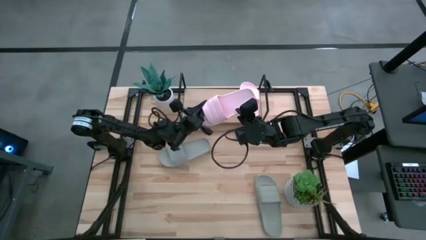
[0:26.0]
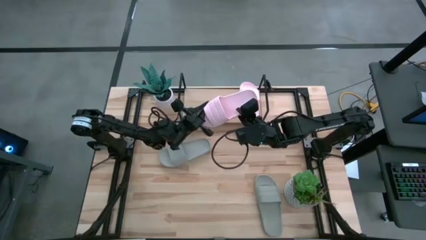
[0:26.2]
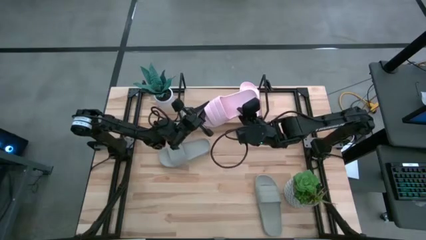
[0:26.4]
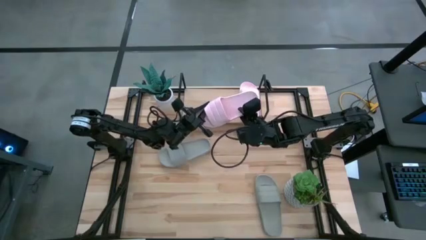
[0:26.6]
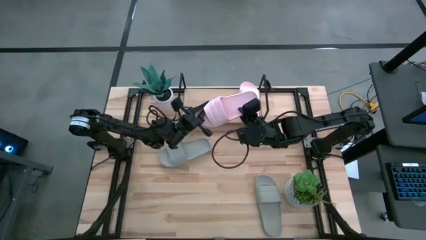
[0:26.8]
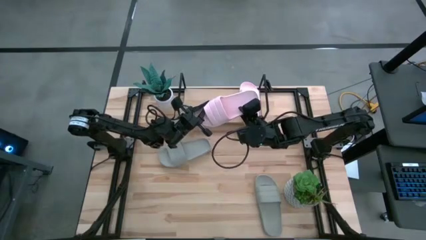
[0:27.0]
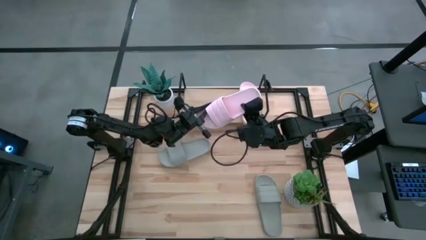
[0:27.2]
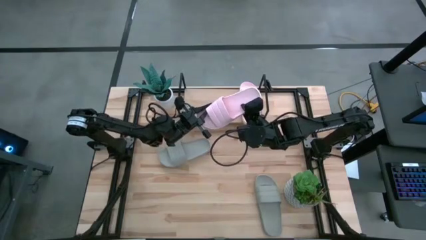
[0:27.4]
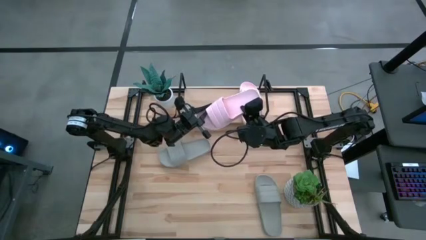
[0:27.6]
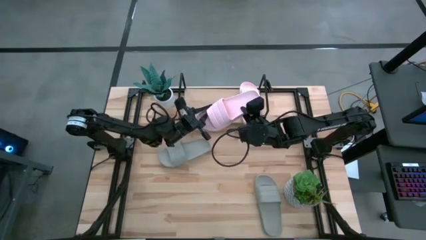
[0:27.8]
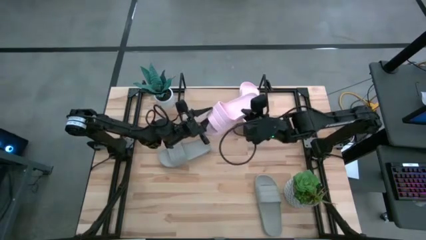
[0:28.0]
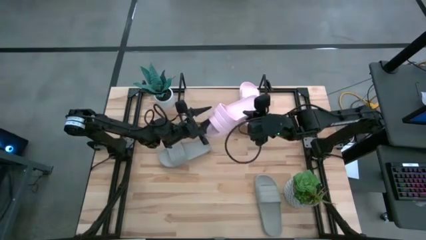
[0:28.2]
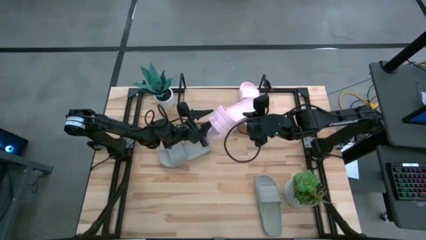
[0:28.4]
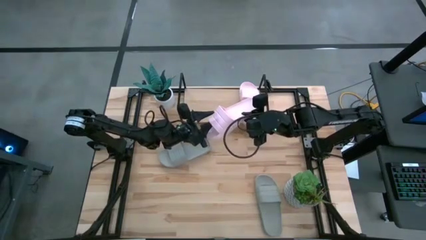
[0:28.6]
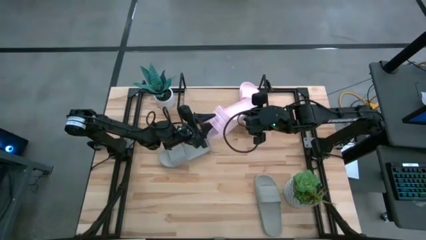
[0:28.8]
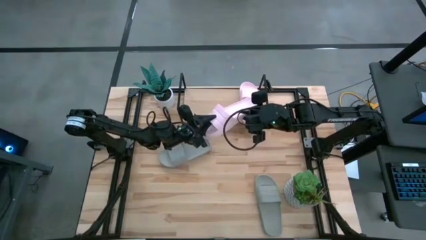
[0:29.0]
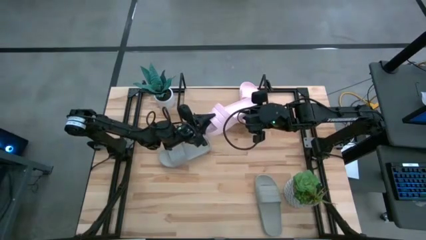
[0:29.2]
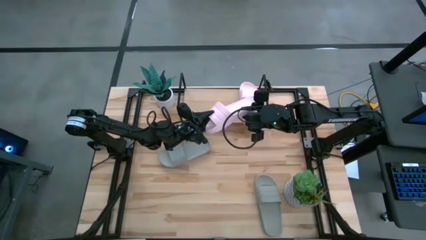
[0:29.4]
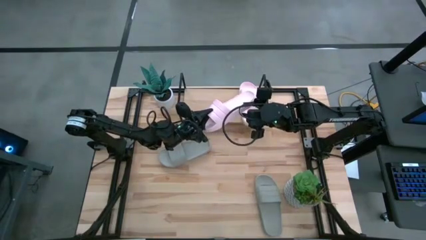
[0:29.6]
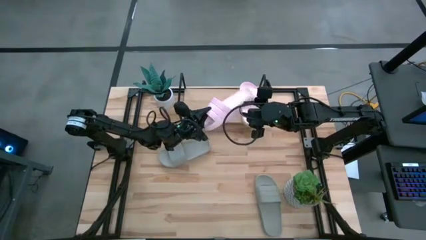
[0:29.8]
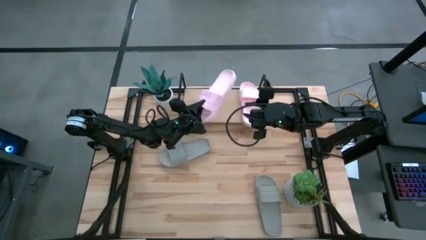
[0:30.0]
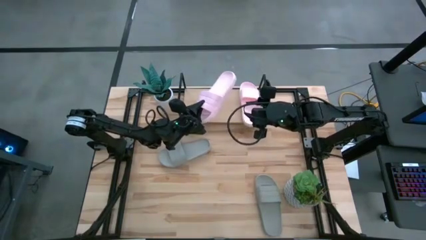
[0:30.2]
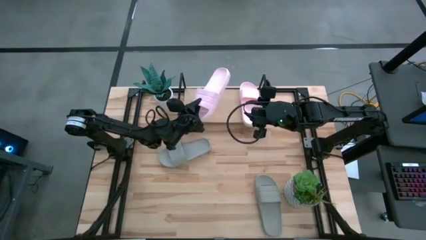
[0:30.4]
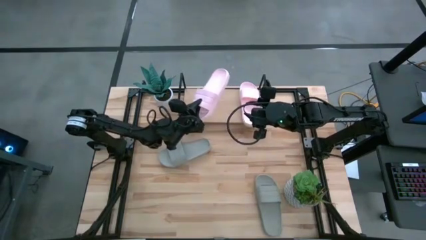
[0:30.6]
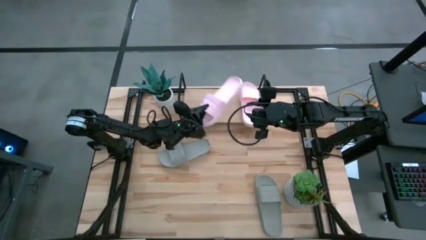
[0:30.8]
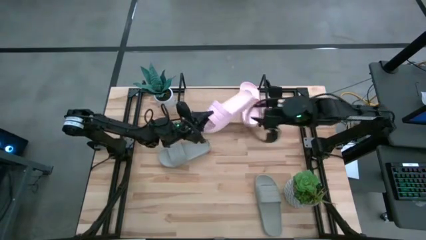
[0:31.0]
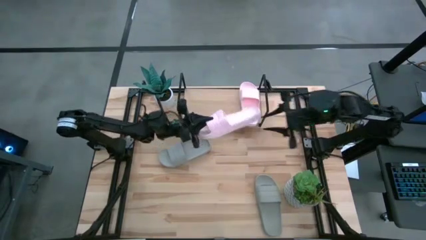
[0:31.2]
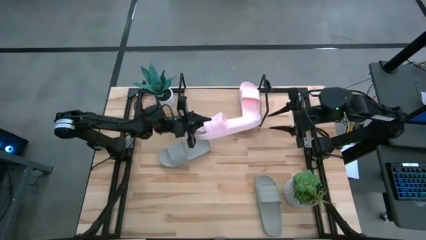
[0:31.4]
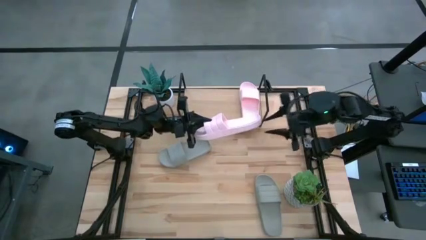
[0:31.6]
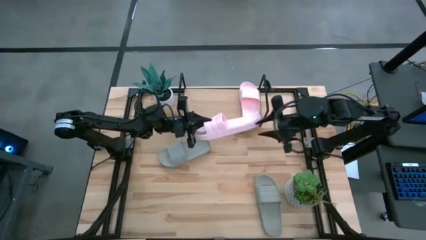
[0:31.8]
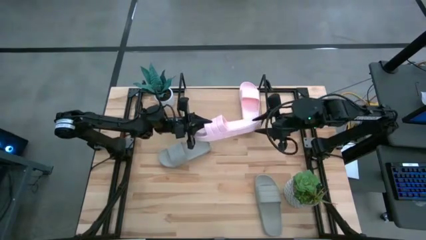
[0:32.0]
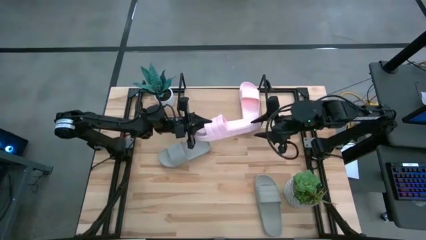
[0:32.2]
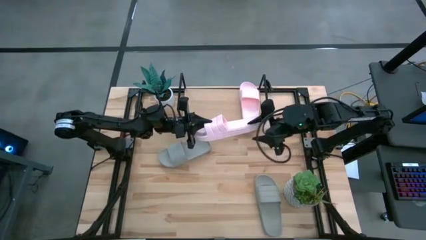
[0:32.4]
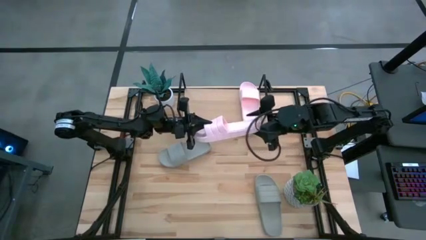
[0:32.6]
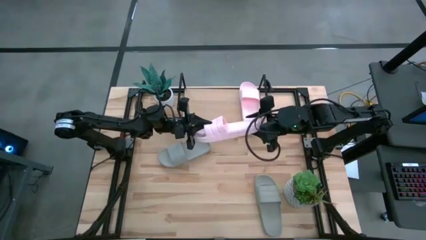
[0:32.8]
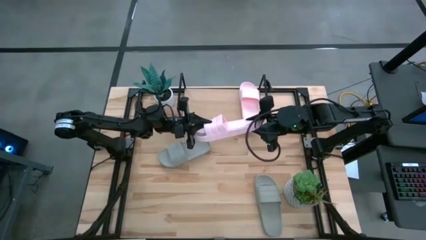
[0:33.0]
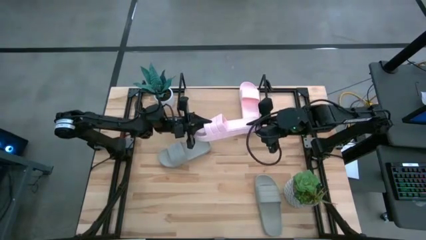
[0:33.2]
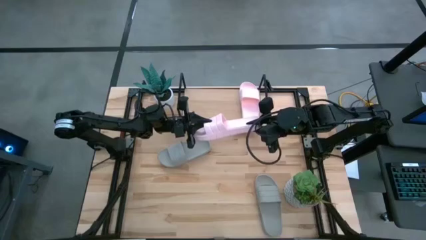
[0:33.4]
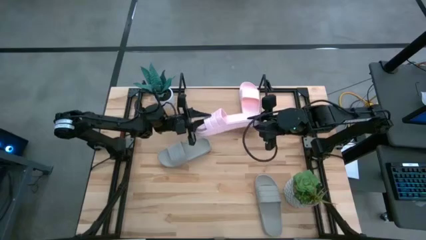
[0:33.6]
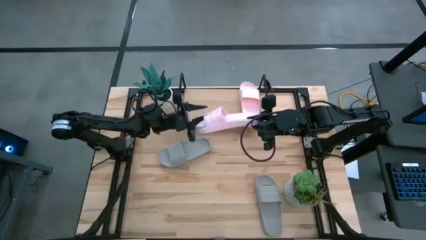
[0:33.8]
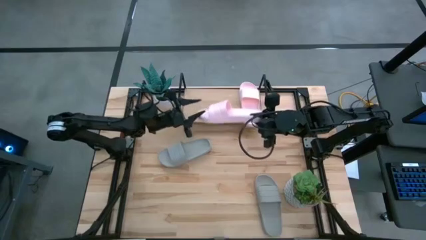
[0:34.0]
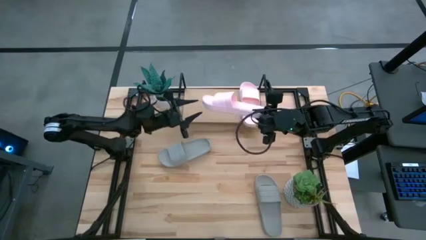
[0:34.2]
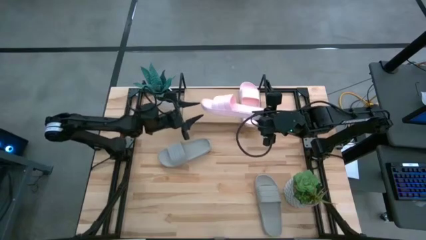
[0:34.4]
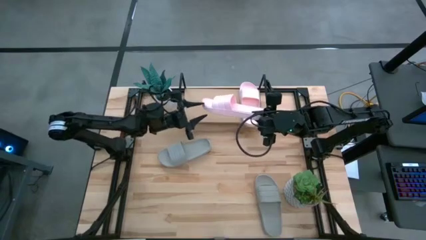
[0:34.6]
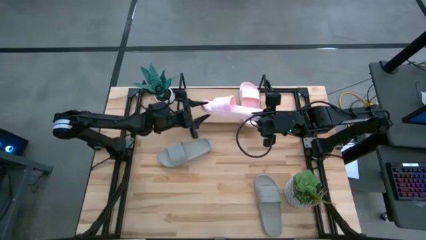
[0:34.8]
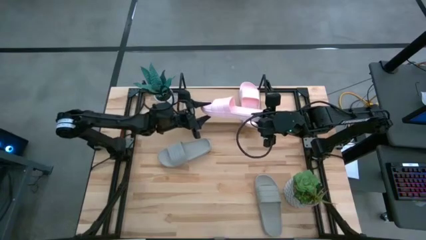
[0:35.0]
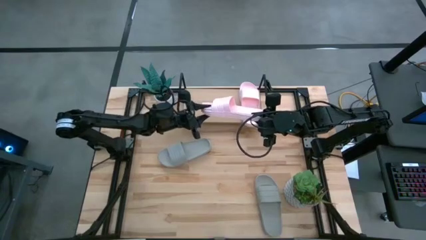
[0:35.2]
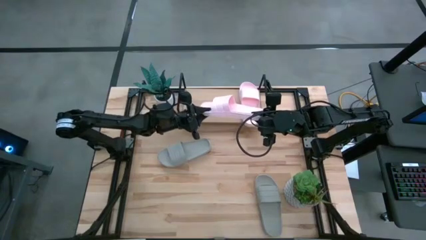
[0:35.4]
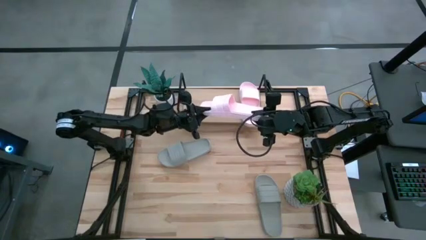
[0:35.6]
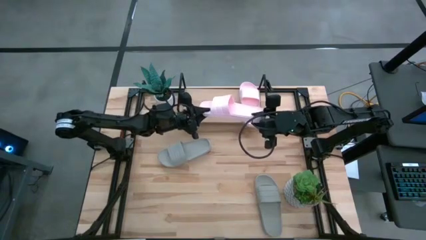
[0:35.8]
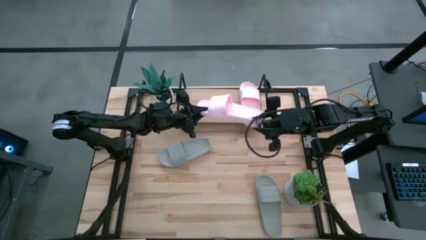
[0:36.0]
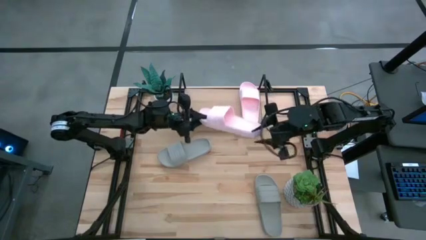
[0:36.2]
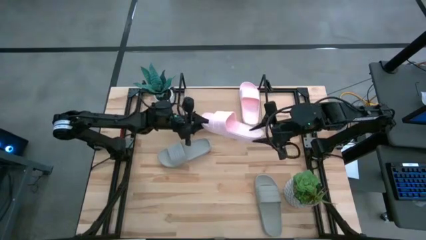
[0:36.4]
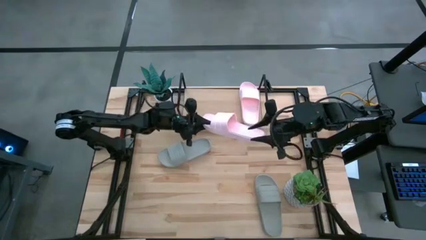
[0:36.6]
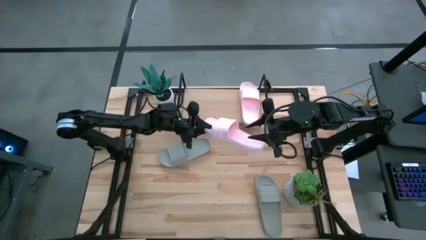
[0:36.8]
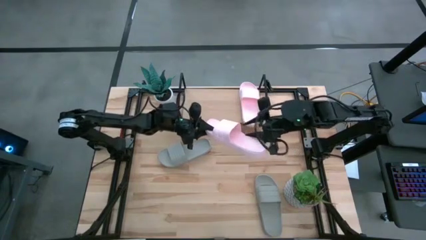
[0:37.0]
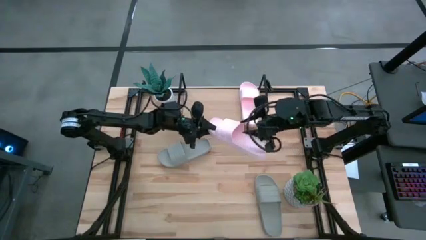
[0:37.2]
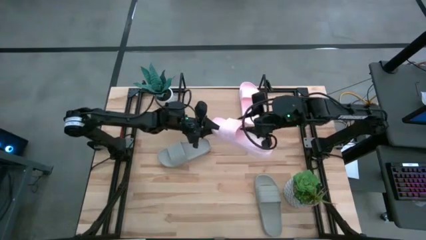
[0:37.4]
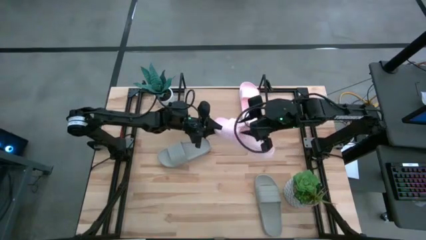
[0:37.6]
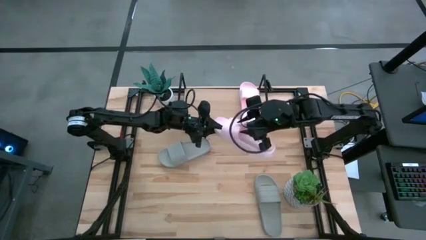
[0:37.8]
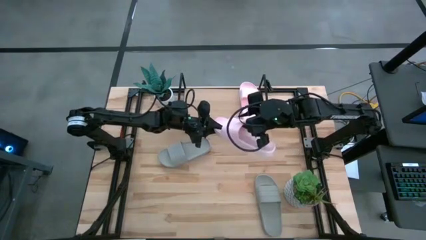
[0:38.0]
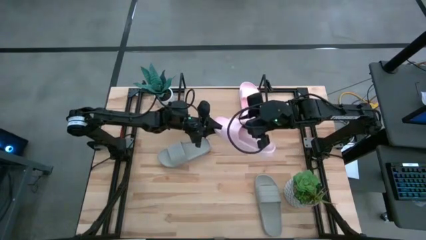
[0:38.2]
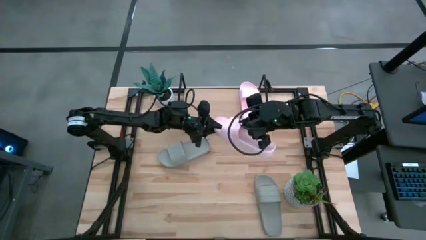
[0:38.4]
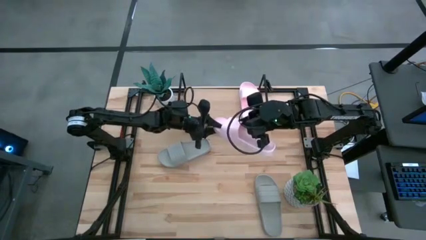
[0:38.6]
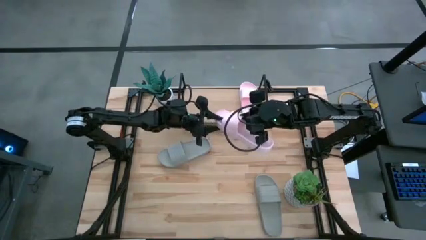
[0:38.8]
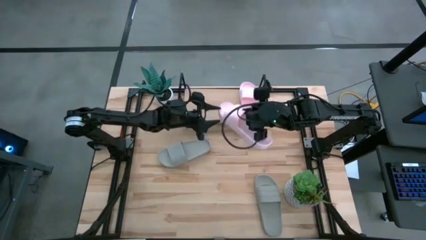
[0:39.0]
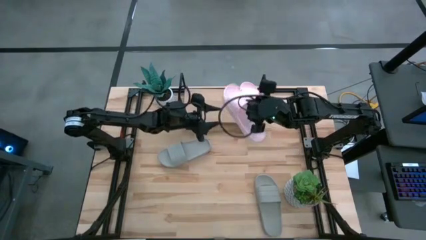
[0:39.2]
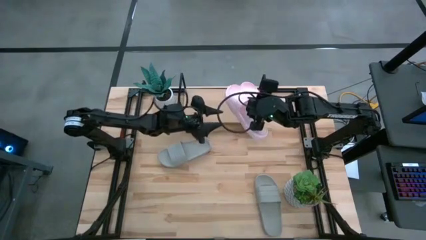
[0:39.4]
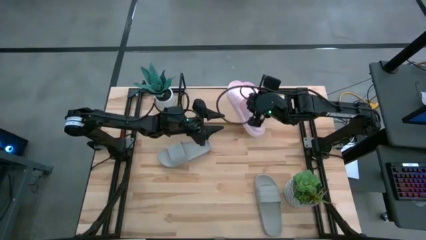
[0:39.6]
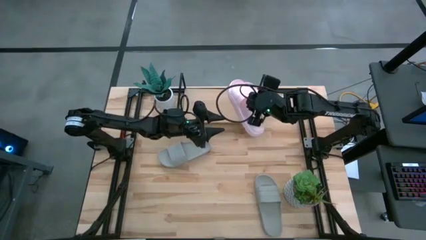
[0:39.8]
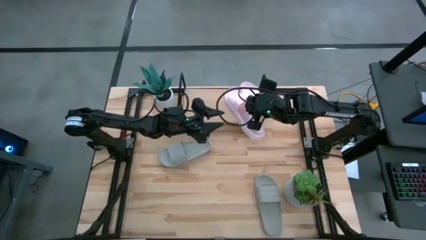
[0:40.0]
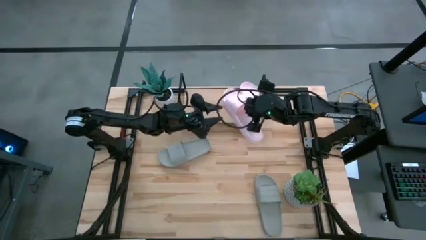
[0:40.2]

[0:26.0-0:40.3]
Task: Pick and place slides into the shelf
Put the pink slide on the shelf
